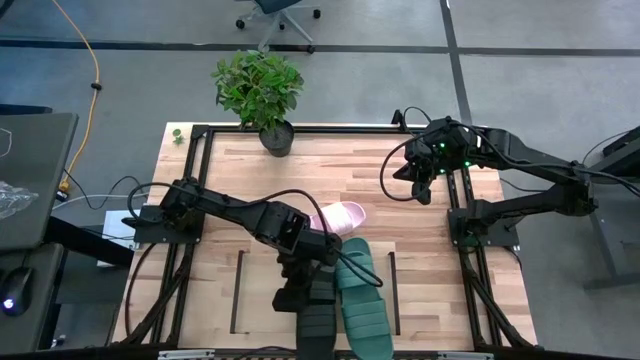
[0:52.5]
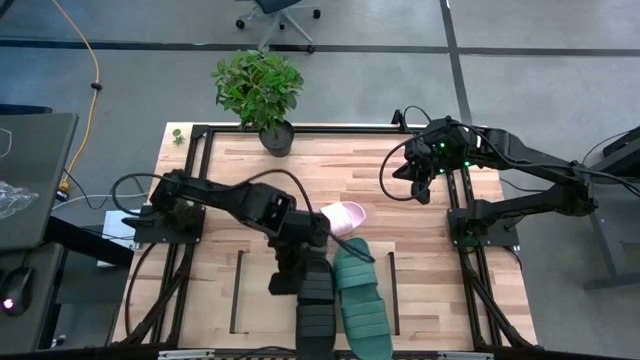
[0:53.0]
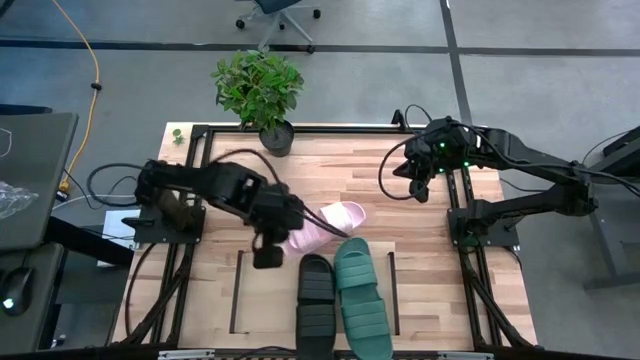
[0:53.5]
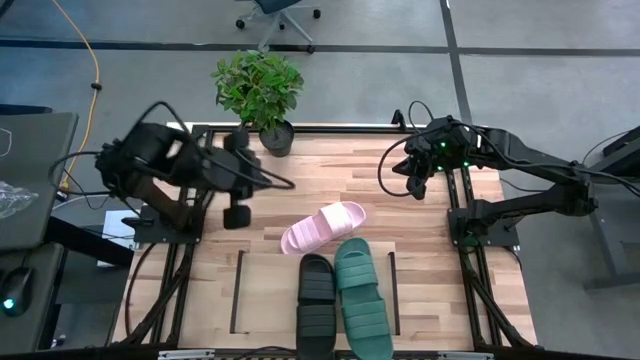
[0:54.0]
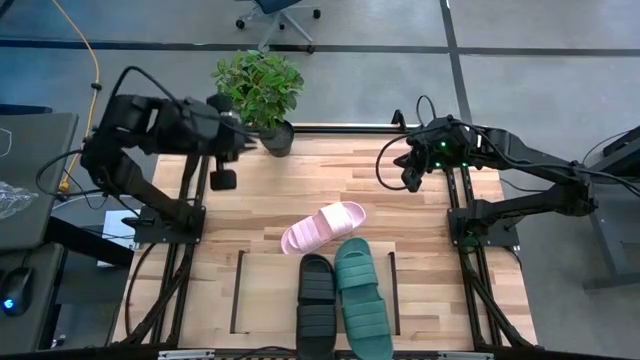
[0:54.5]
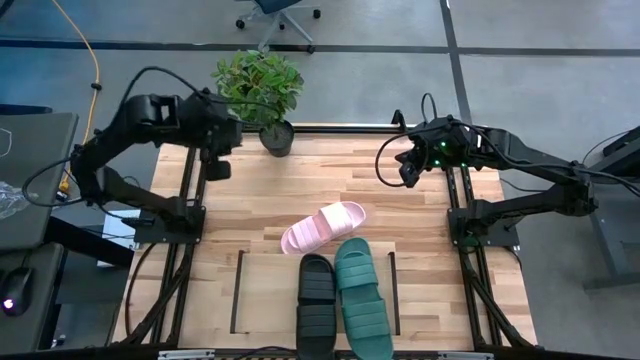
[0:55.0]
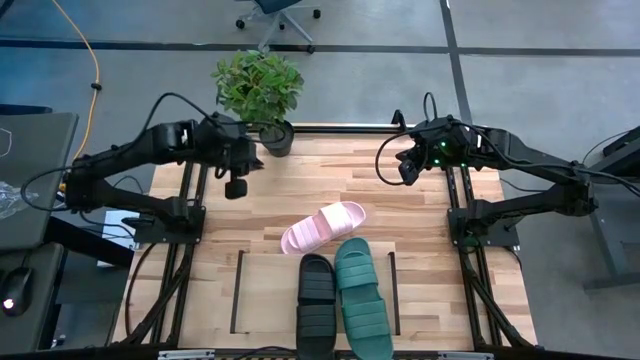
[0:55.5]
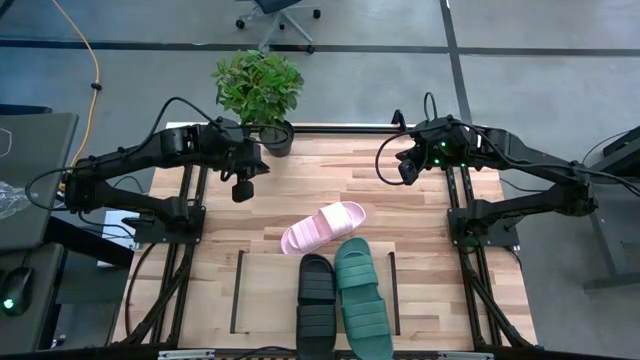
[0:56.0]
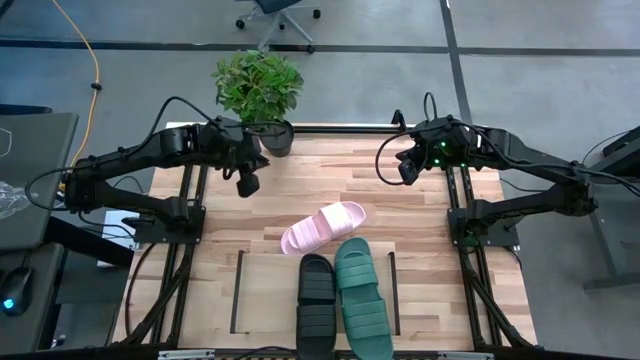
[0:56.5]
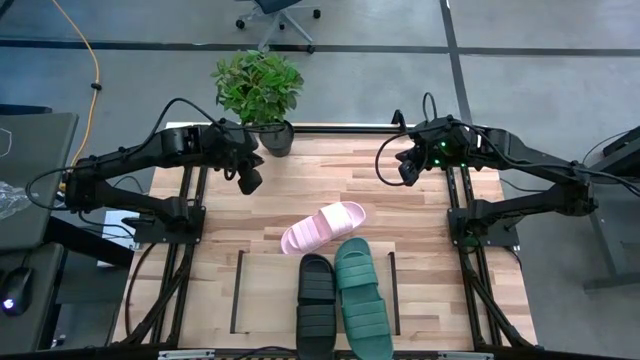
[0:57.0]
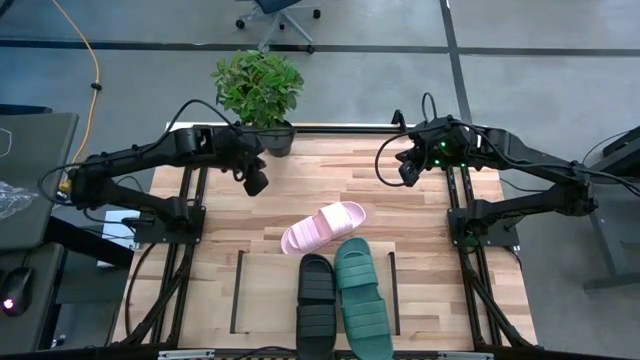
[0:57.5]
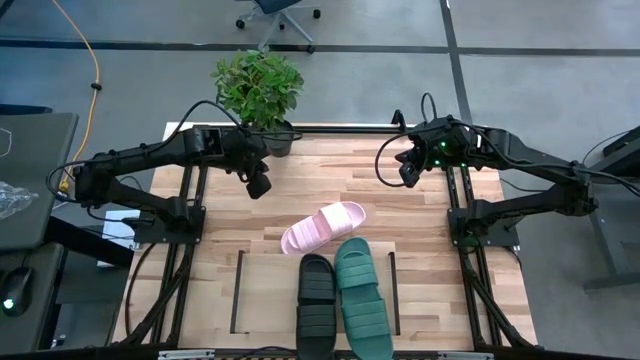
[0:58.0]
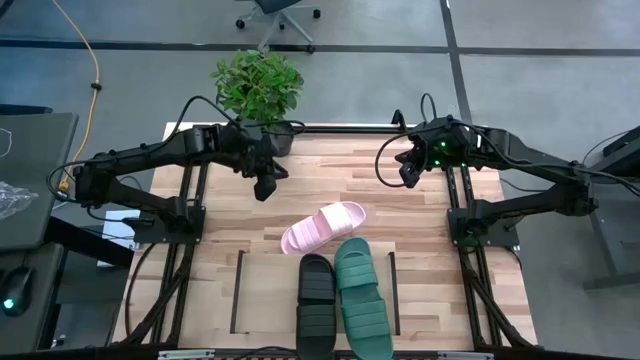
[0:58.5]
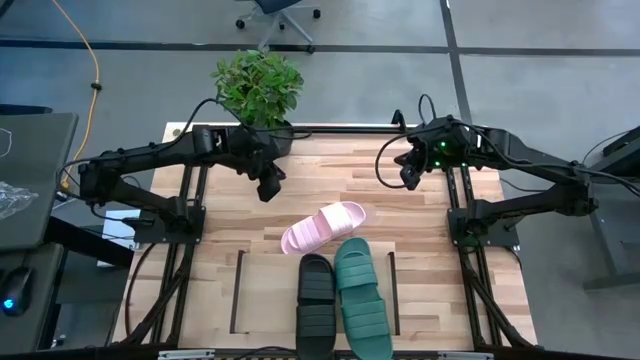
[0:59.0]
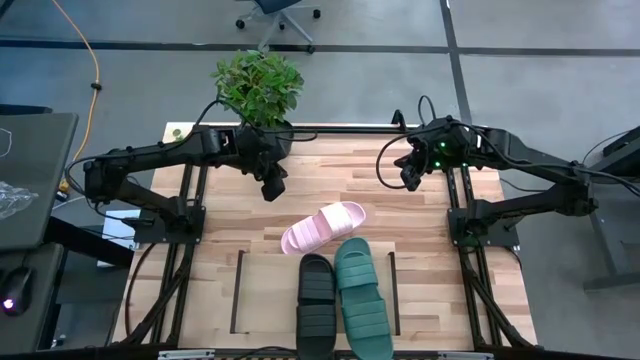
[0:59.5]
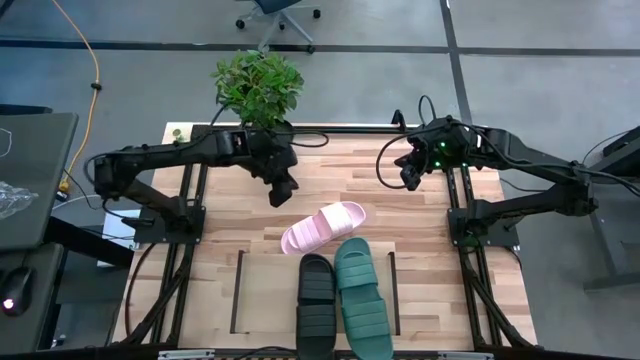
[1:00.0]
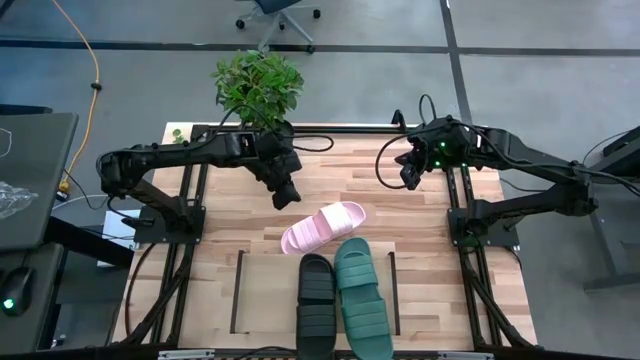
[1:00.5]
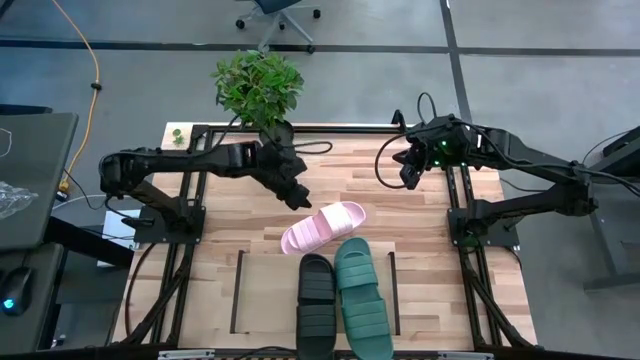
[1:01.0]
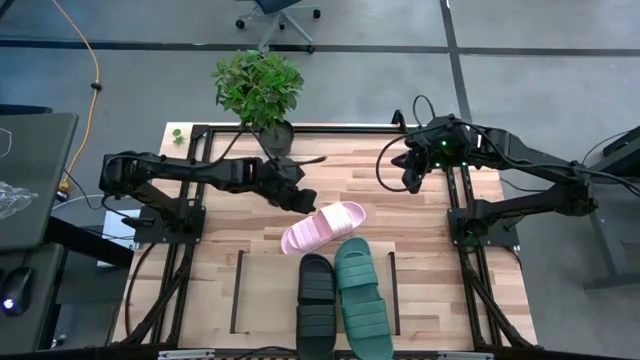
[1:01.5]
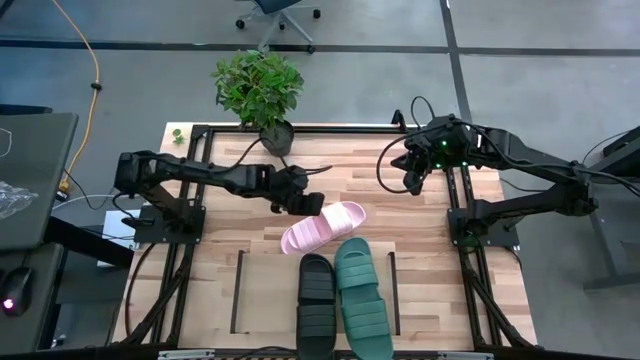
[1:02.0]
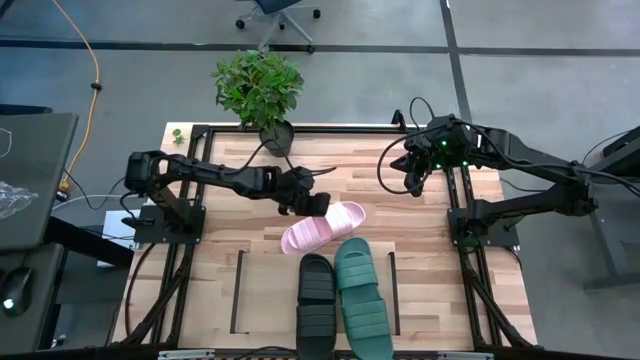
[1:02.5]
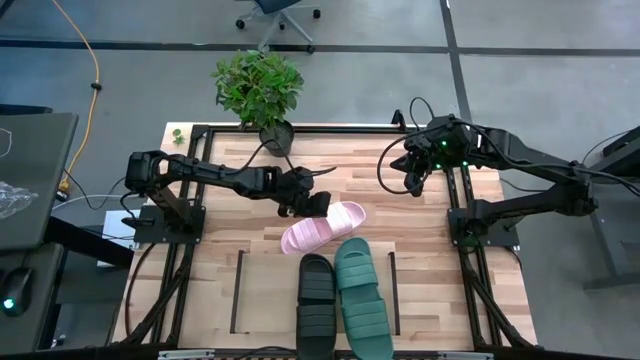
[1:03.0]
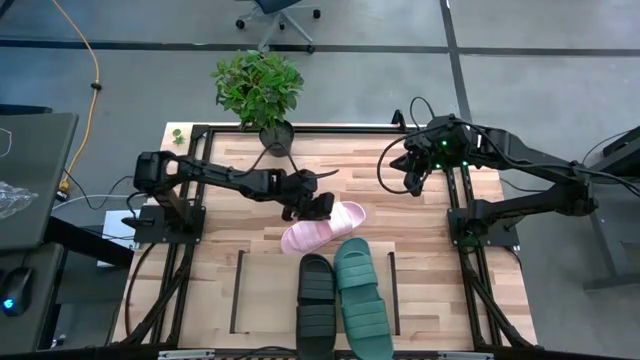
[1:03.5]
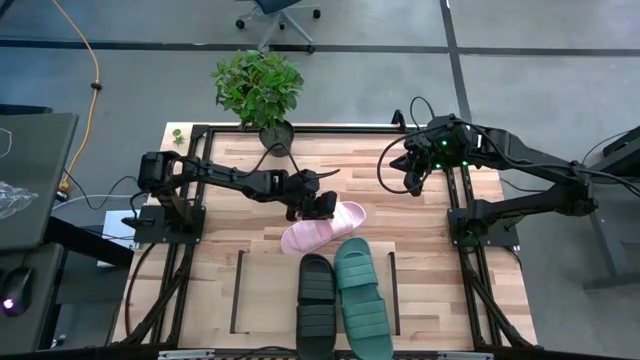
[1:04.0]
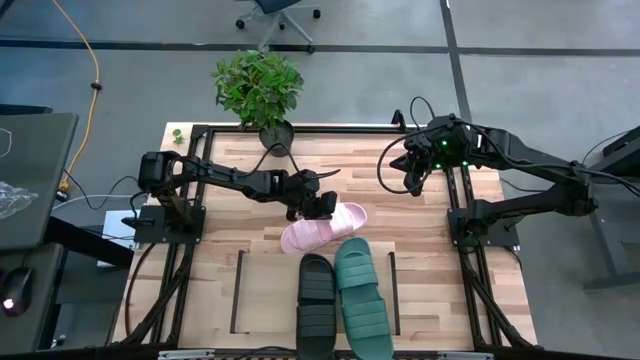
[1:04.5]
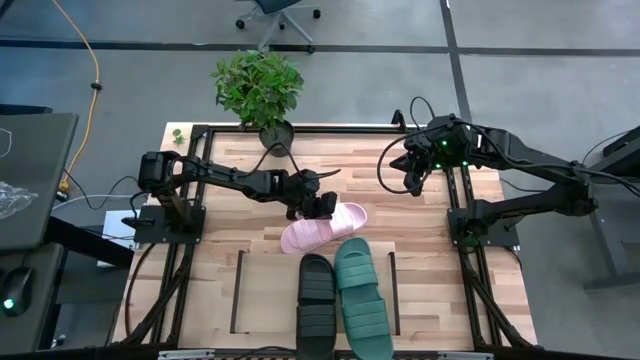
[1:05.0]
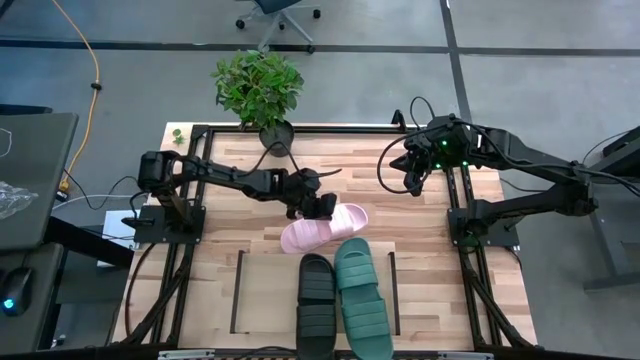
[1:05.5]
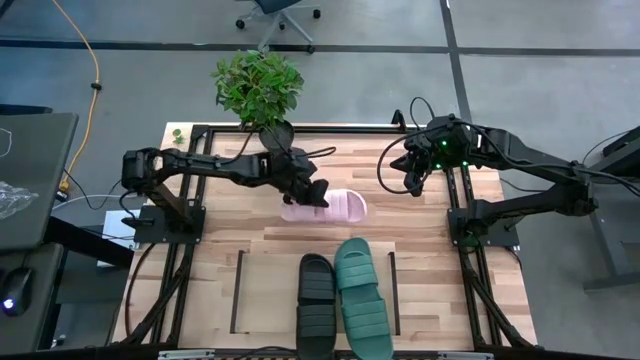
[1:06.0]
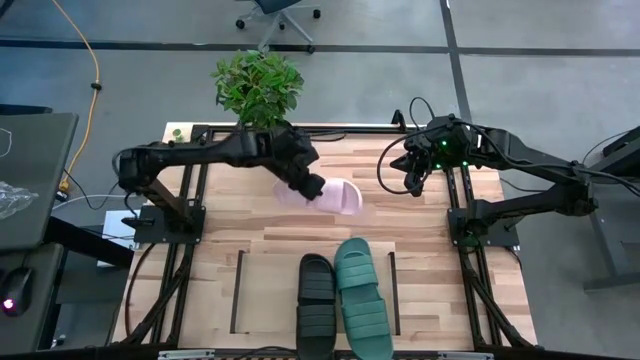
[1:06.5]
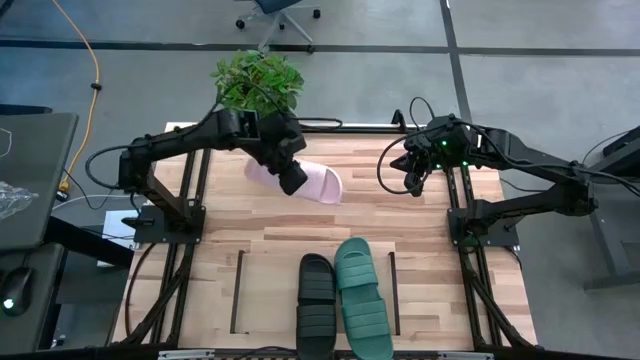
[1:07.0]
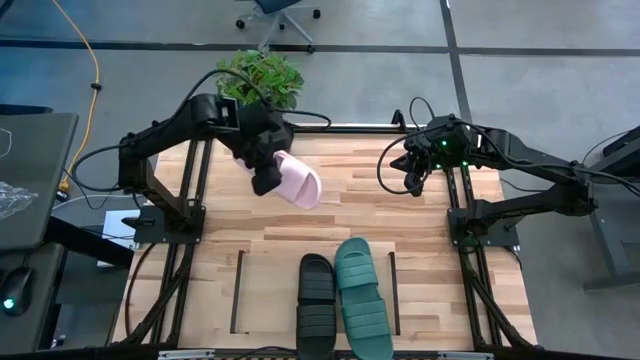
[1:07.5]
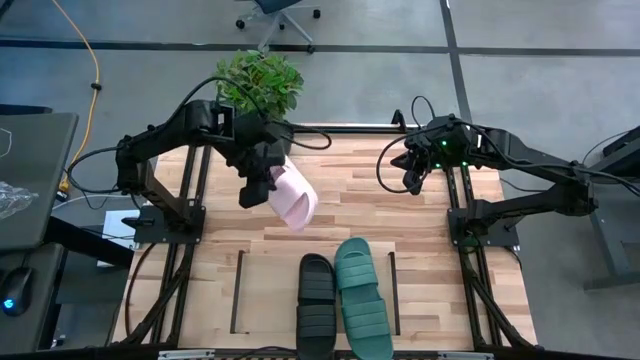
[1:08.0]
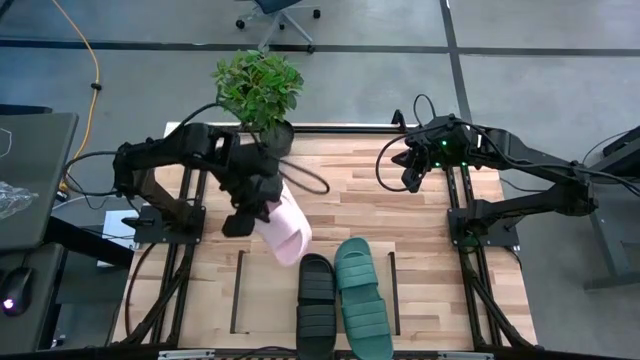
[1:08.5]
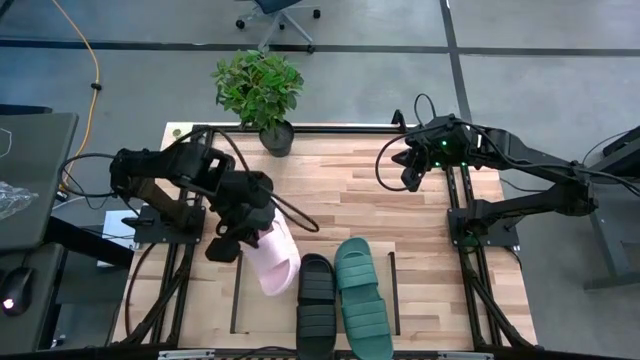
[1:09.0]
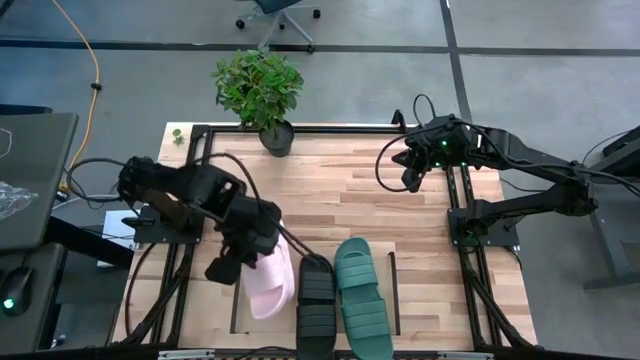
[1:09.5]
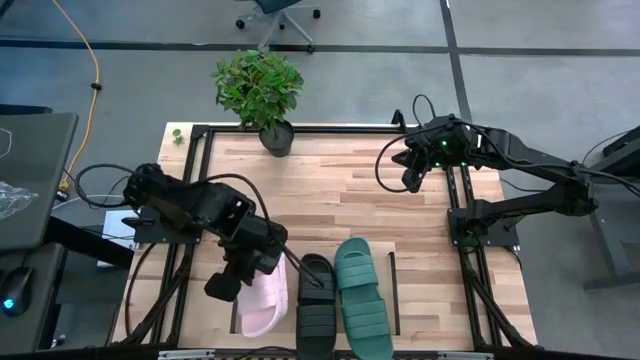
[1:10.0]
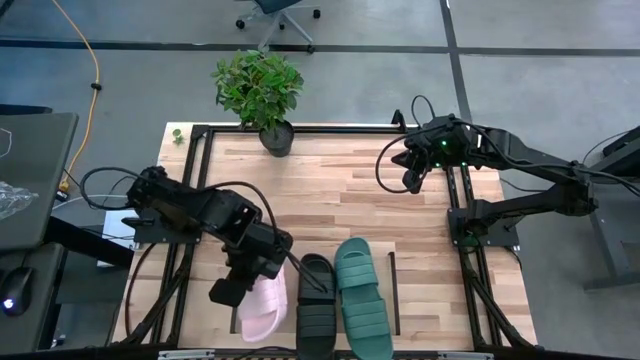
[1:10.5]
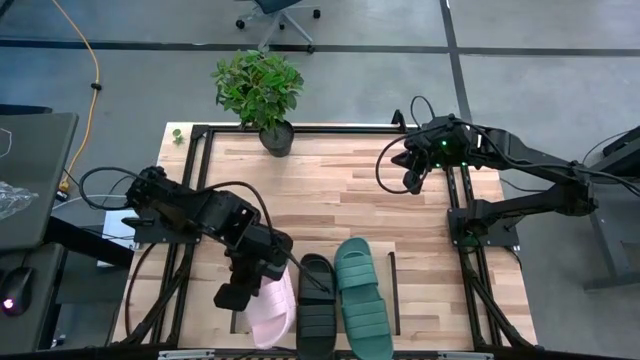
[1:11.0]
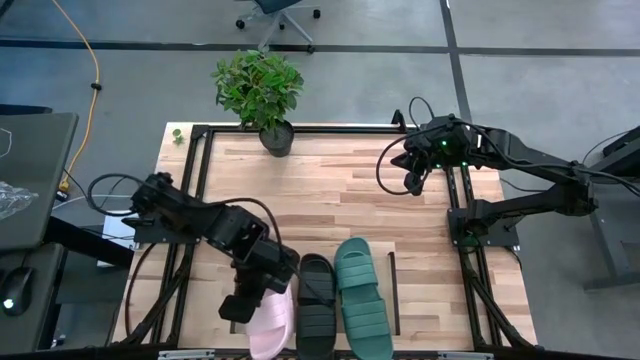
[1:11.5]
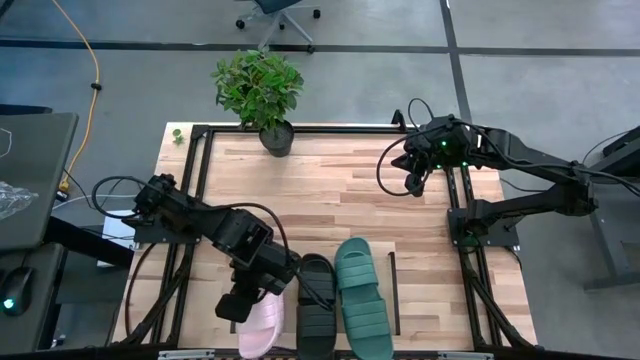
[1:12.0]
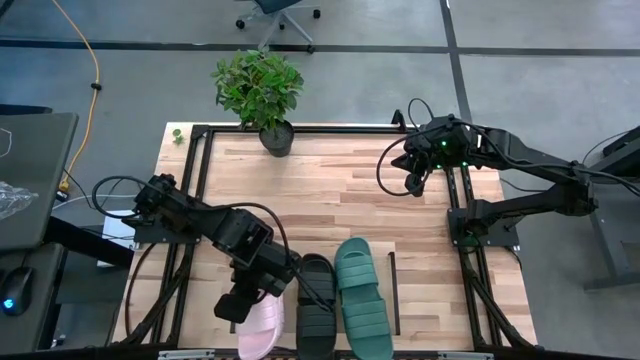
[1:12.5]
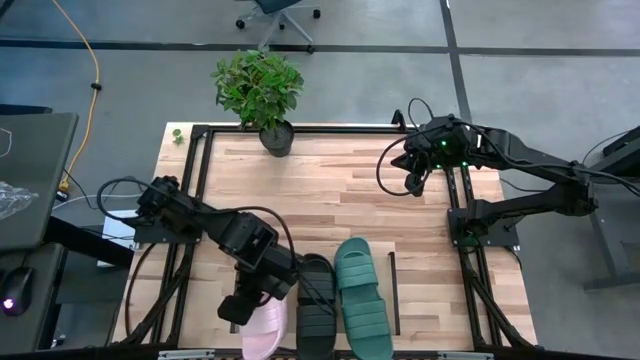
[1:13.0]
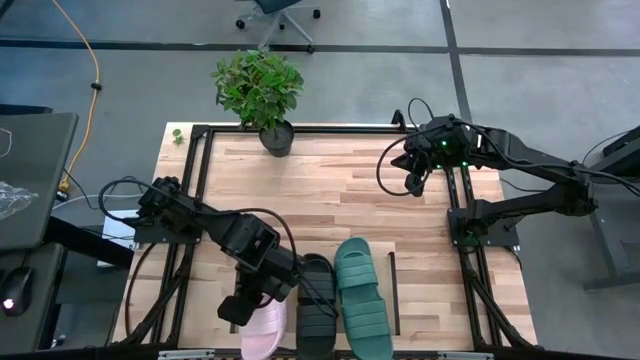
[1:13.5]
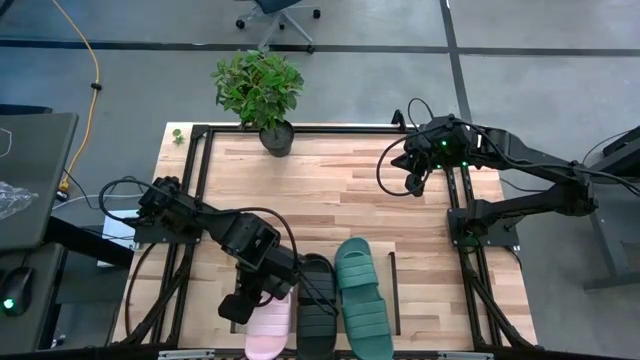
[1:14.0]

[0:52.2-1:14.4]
Task: Pick and place slides into the shelf
Put the pink pair of slides on the shelf

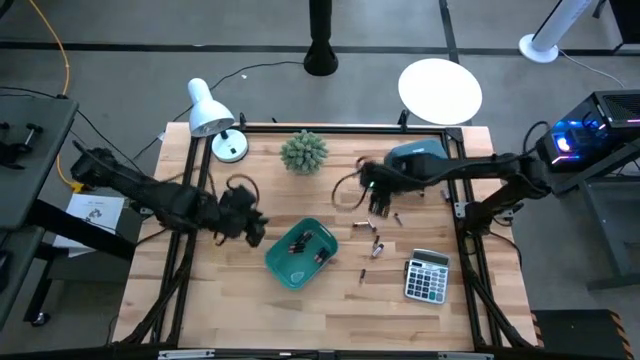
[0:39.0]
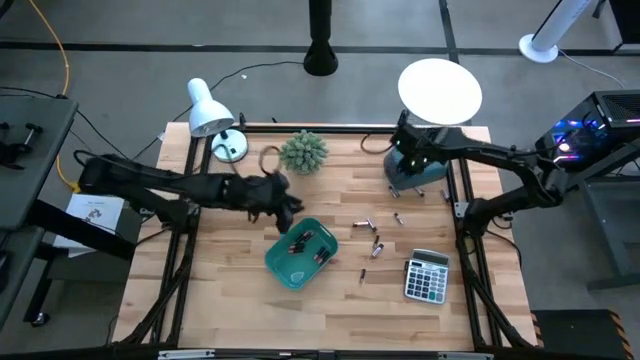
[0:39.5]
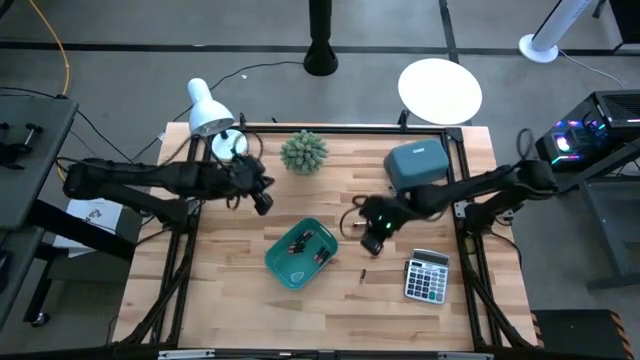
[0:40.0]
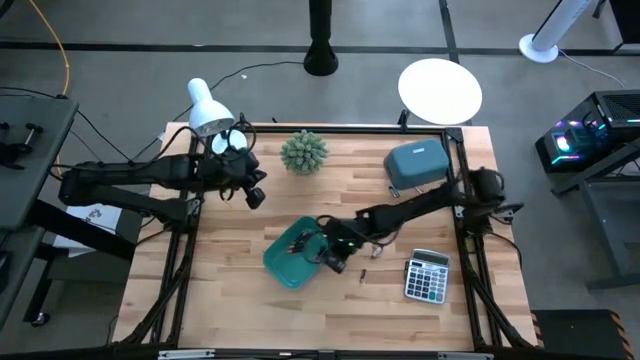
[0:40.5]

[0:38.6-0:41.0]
Task: Sort batteries
Adjust the green bin
